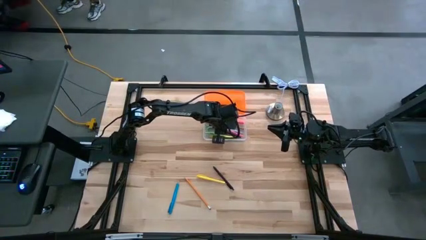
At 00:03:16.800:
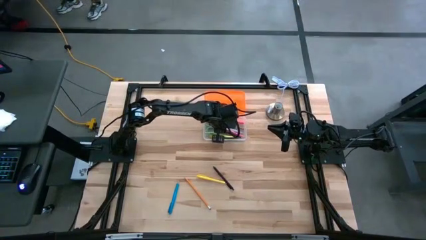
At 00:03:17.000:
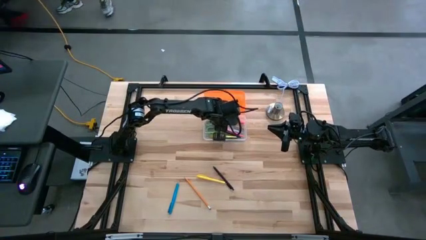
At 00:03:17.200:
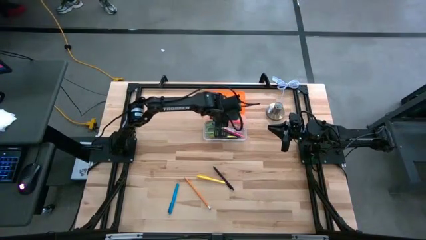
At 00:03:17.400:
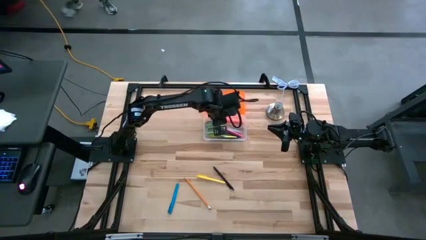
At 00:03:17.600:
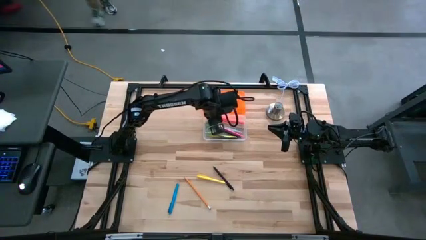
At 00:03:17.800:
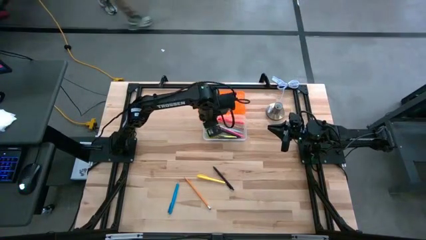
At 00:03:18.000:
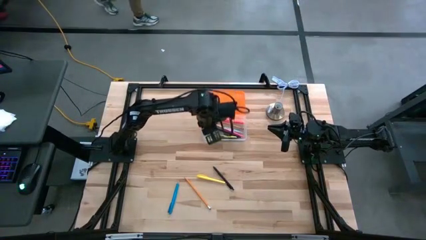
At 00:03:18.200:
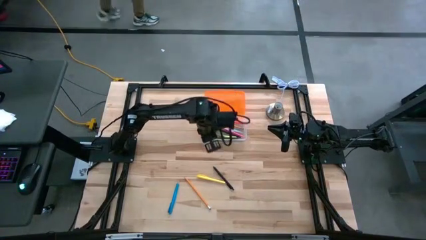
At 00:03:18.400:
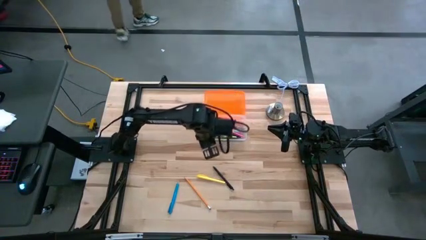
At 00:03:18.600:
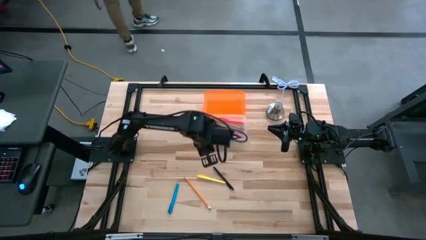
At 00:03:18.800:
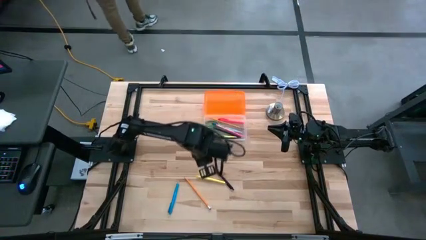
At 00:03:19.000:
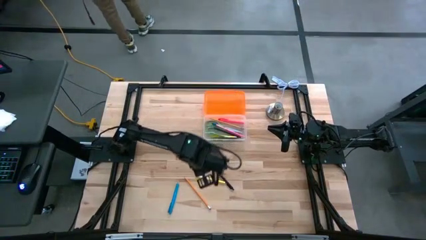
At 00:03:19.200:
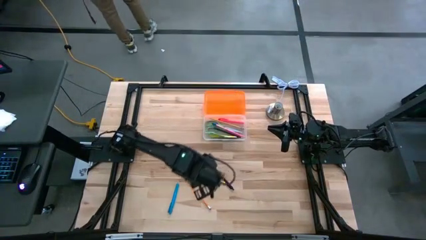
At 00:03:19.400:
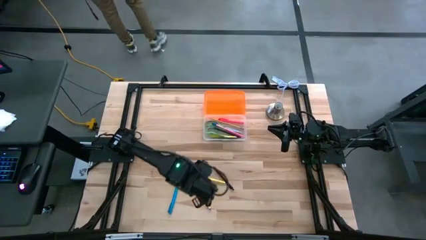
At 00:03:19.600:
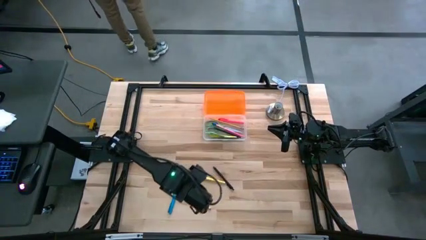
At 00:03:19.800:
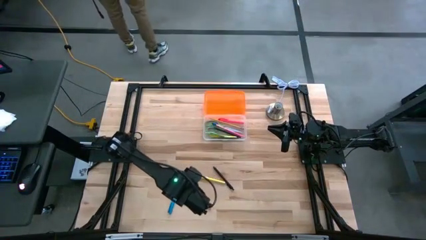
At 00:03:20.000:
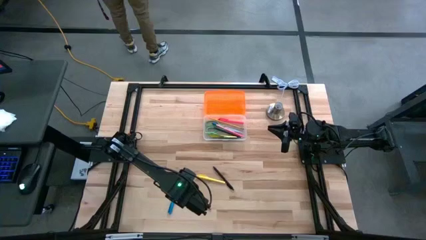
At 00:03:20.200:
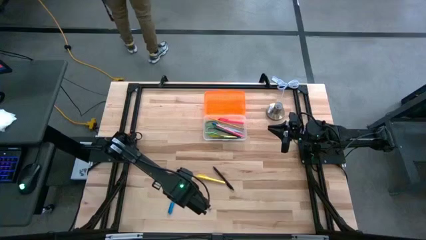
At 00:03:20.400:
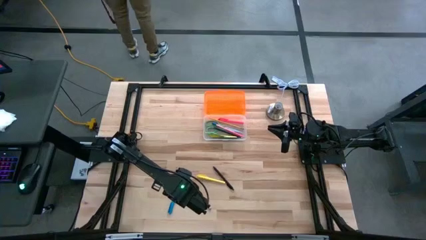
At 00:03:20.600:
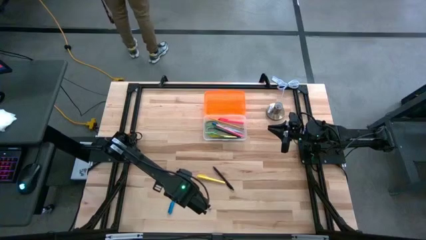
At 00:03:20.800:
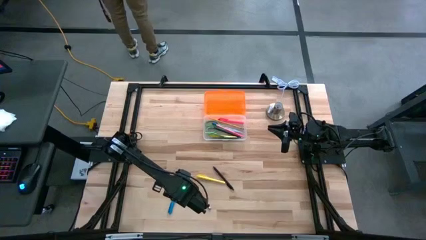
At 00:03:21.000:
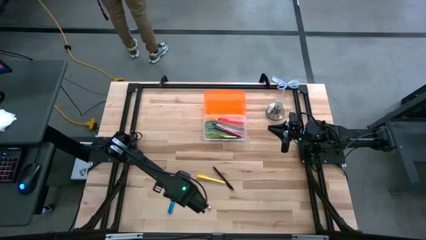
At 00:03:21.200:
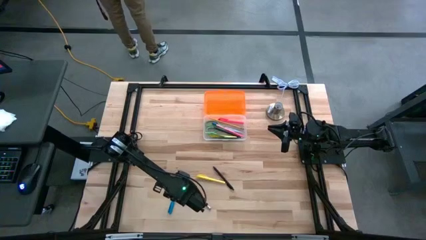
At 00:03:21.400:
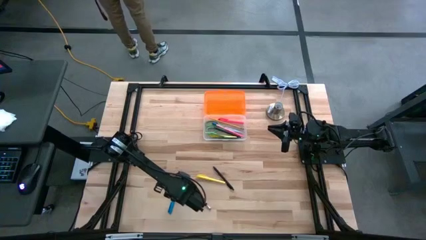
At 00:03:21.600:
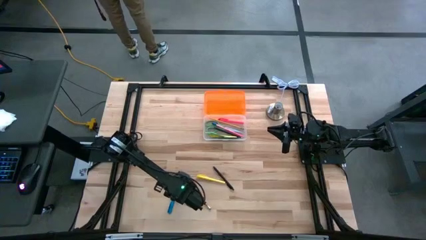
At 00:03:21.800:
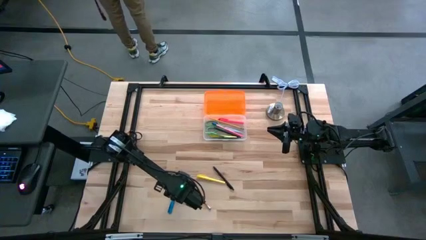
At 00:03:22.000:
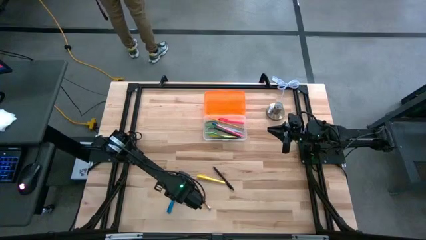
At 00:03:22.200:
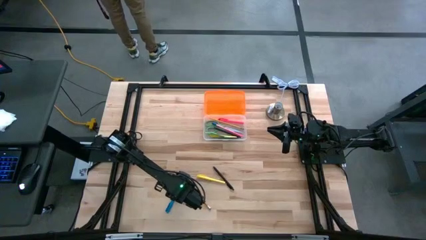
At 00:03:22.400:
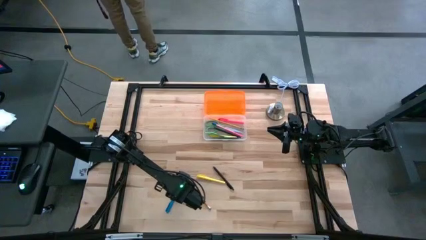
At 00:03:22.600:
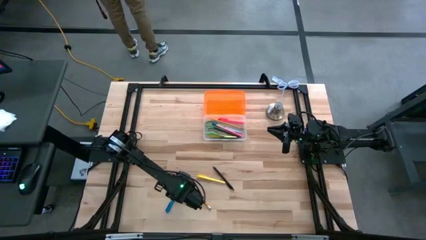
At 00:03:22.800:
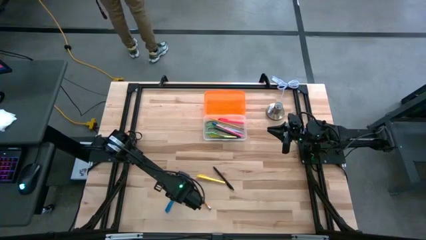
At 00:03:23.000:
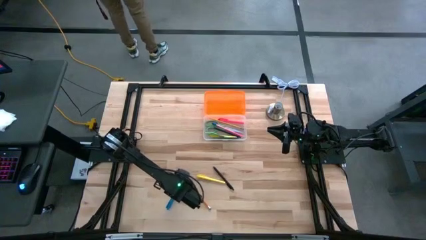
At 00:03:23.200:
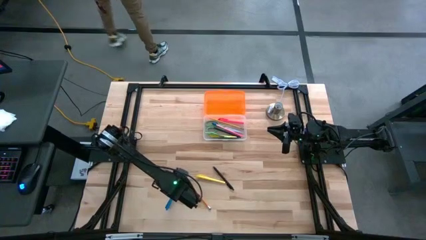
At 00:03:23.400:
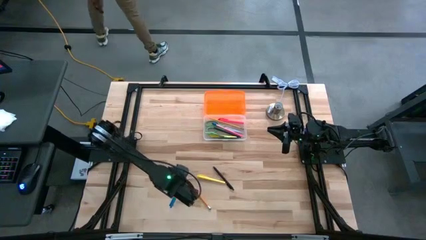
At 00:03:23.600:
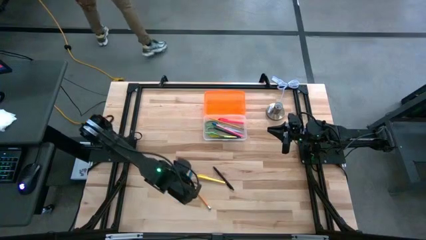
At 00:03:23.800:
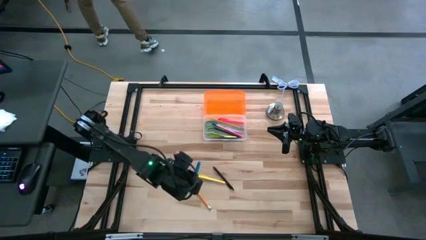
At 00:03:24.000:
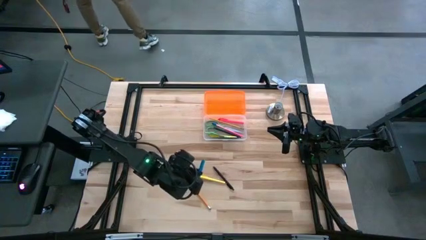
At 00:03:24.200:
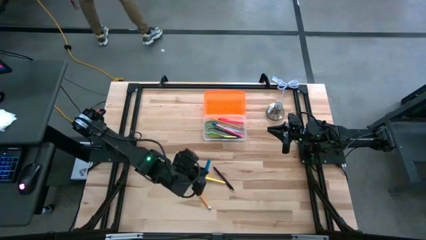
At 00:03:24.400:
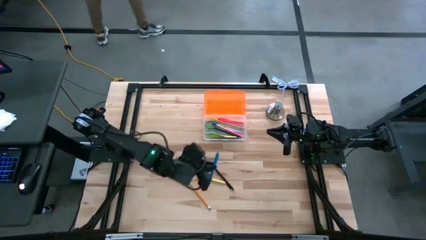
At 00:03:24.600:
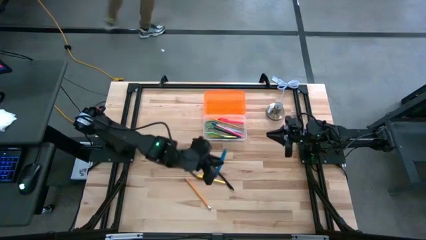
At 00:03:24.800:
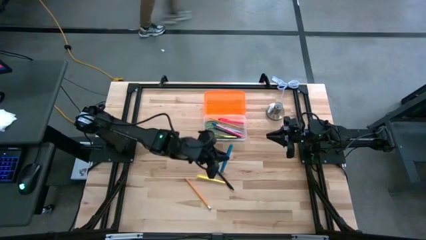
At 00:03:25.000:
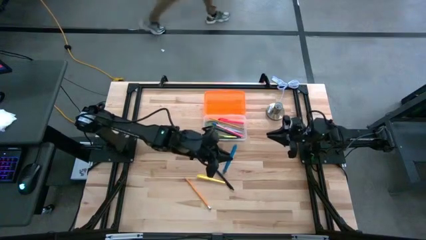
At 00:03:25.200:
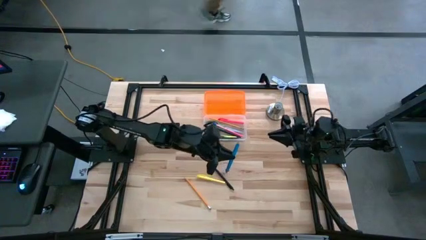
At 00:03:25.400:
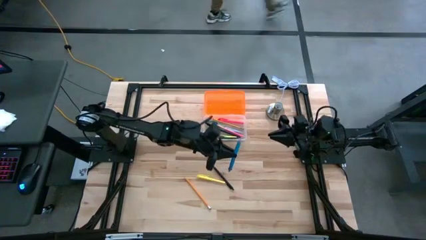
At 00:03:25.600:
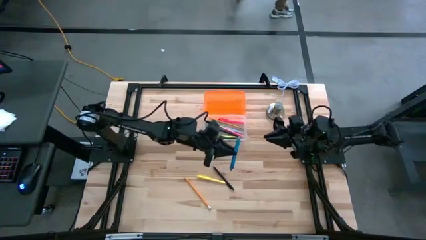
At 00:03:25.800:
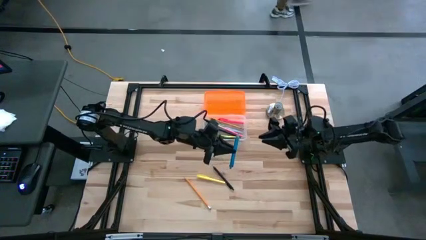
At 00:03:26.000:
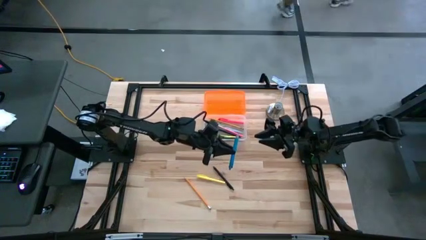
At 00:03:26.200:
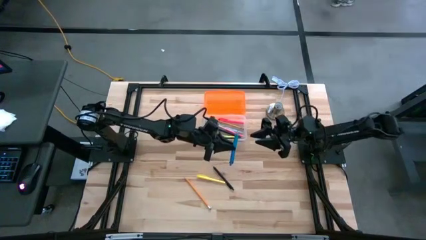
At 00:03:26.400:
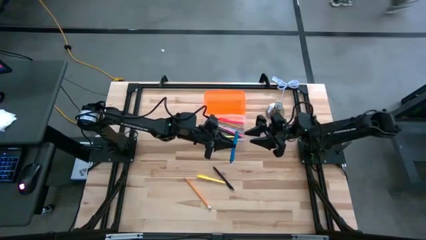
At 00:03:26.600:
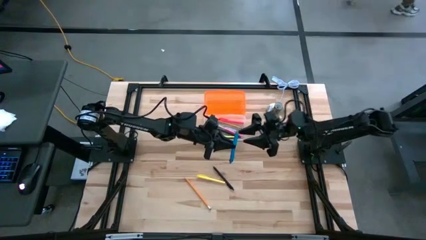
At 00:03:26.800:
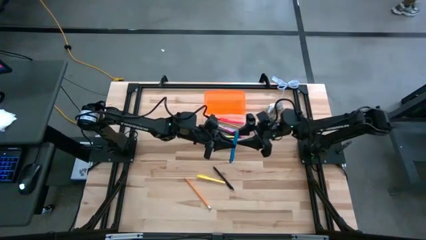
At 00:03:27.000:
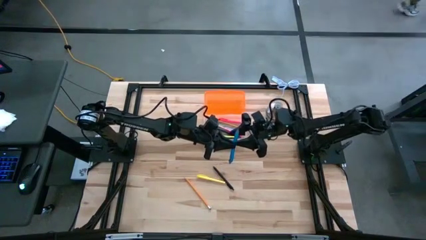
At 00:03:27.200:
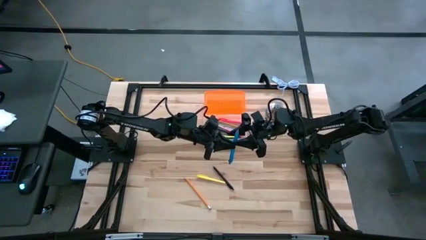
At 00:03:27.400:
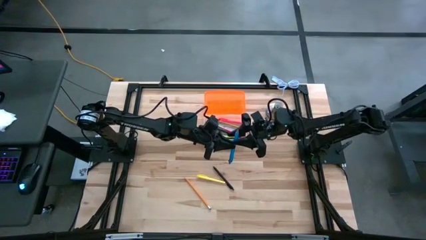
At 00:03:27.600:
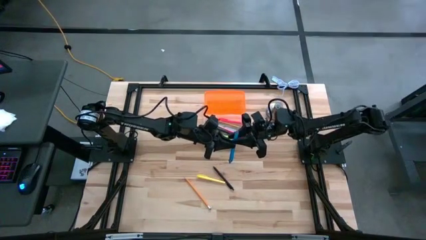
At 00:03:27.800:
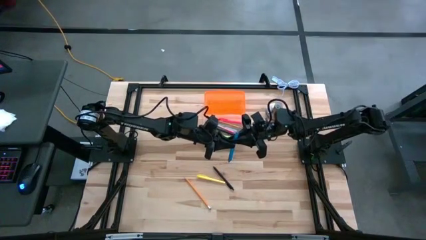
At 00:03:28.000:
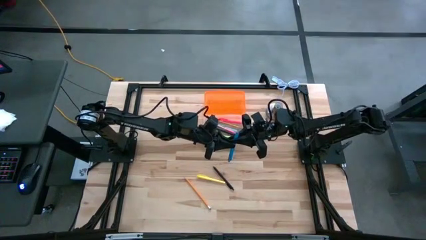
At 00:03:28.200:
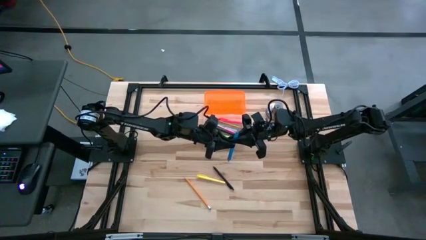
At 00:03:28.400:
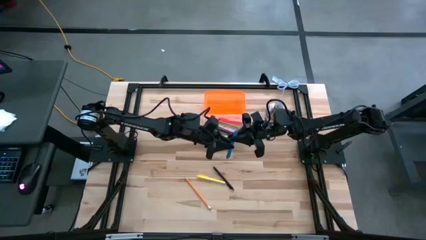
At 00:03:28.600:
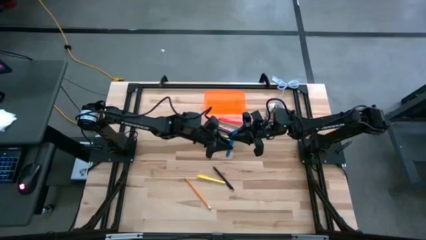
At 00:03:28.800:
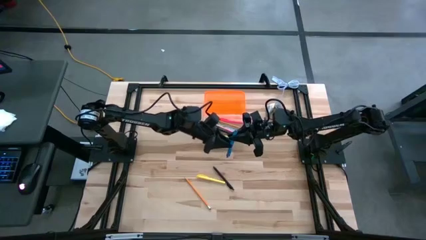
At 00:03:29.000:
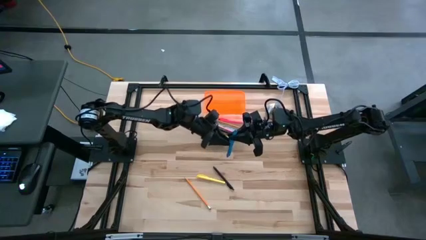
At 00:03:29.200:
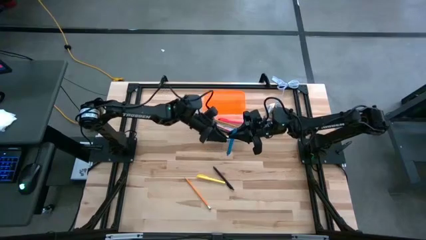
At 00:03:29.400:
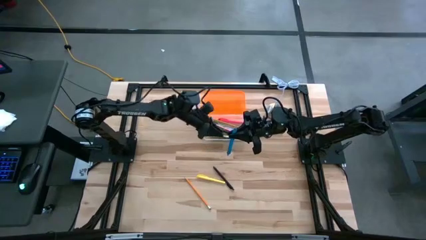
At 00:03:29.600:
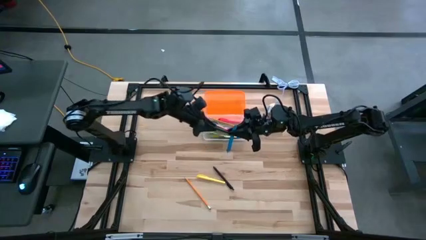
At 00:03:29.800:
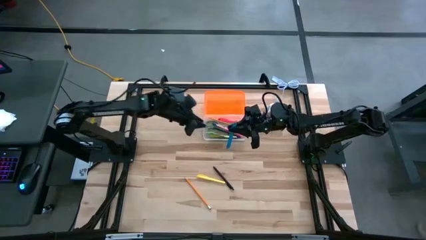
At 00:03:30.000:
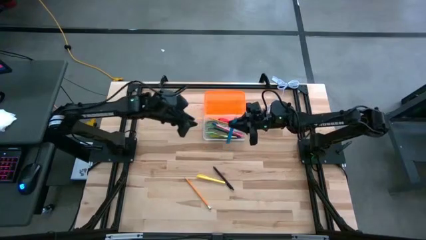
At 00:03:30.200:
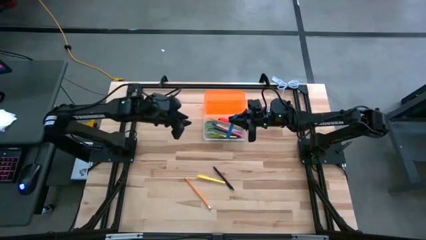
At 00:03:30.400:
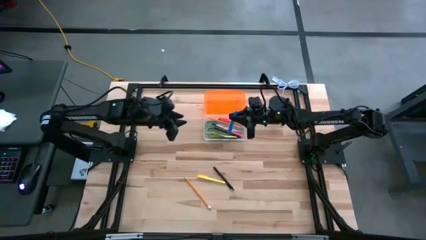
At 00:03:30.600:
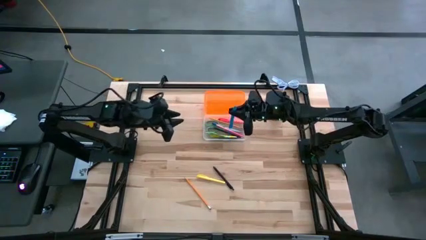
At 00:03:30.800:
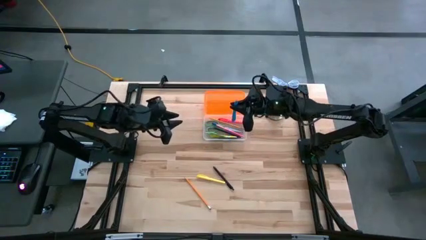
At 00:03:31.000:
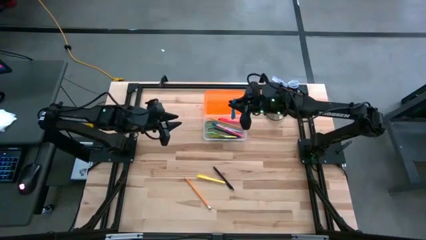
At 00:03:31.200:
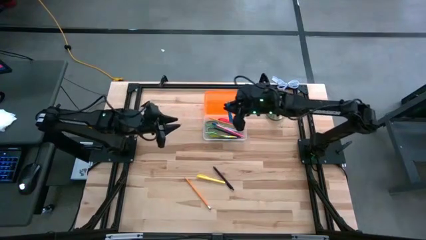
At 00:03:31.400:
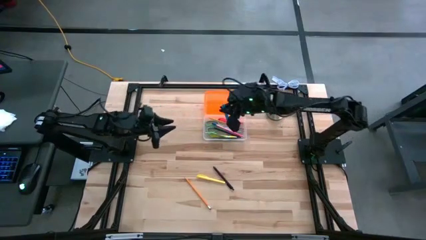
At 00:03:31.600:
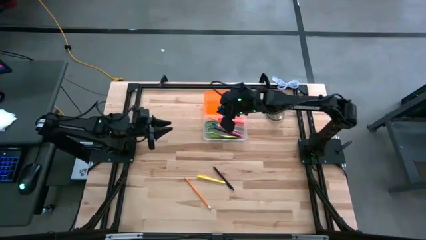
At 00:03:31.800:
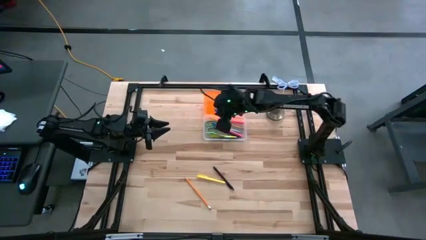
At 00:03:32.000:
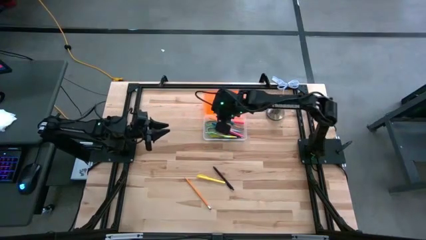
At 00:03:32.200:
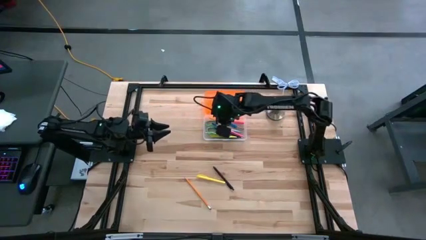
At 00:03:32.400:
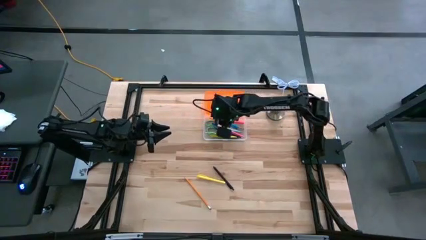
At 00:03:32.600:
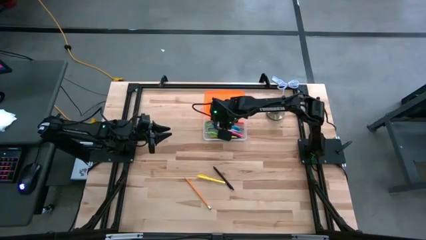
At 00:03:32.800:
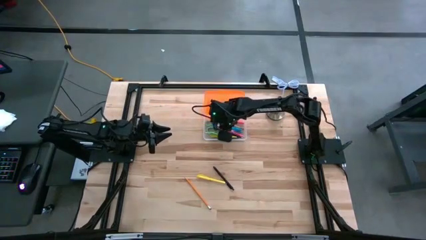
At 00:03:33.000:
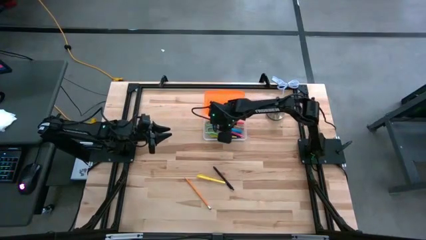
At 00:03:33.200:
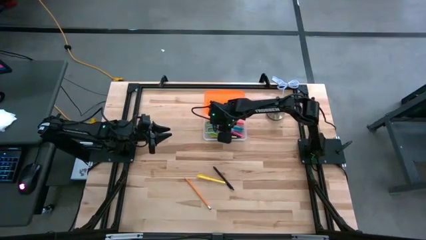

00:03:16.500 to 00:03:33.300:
Task: Pick & place school supplies into a supply box
Put the blue pen into the supply box
